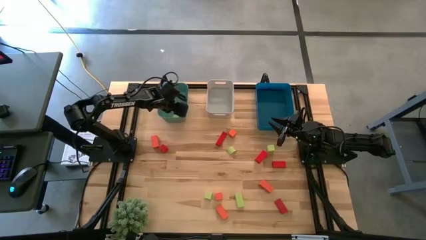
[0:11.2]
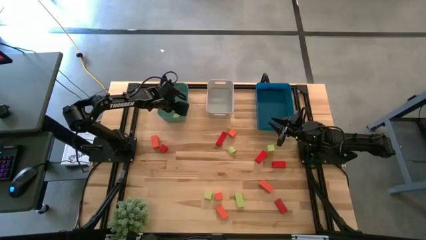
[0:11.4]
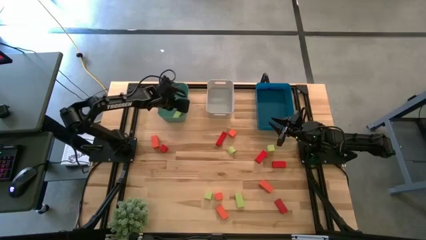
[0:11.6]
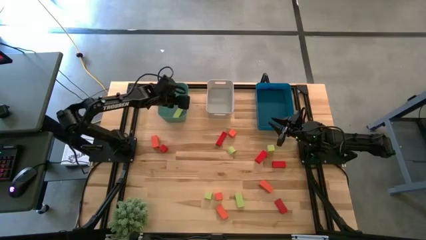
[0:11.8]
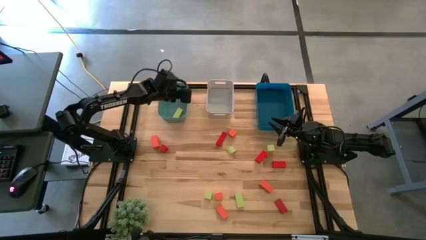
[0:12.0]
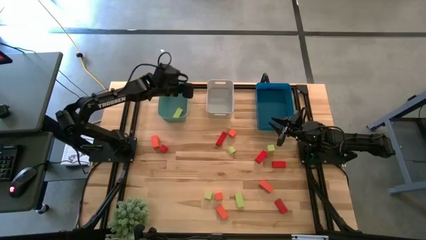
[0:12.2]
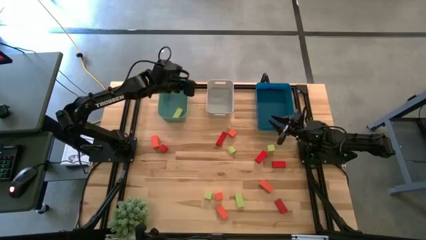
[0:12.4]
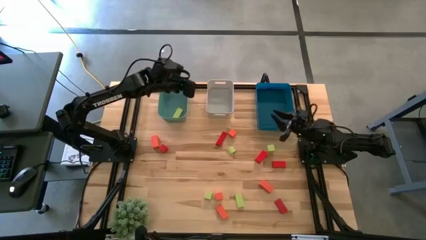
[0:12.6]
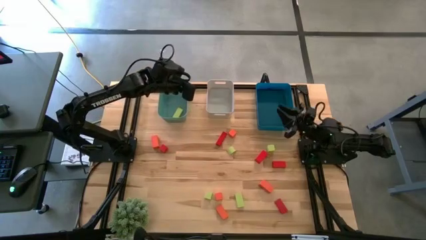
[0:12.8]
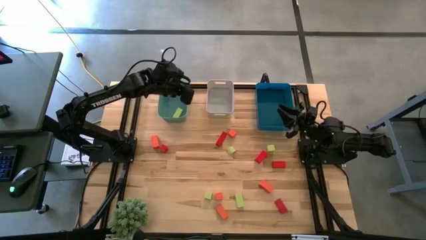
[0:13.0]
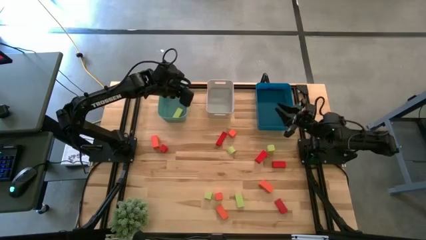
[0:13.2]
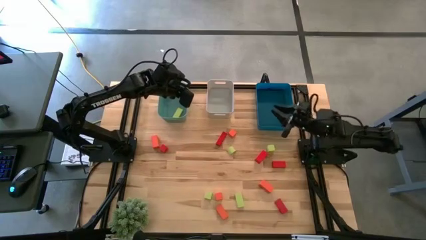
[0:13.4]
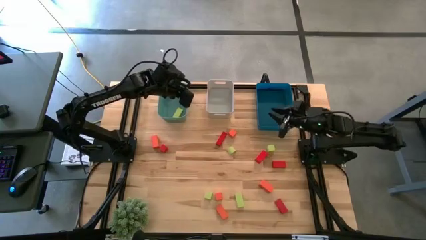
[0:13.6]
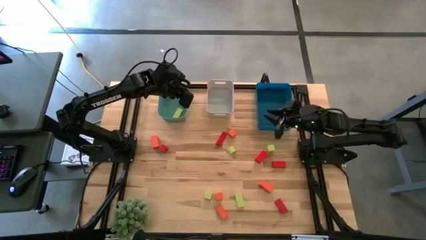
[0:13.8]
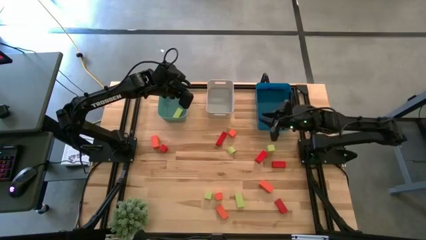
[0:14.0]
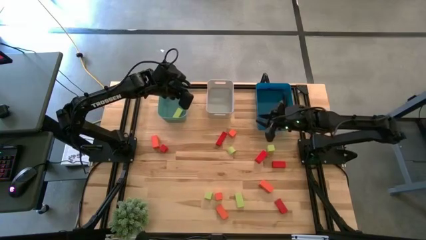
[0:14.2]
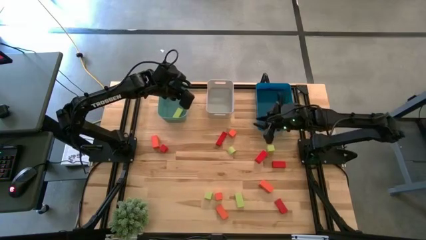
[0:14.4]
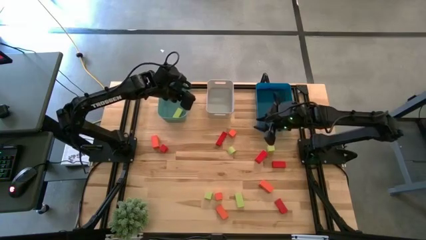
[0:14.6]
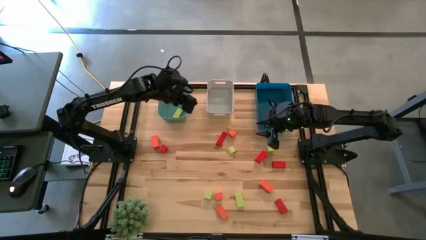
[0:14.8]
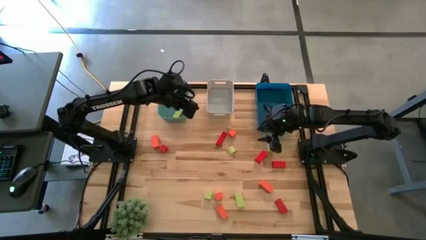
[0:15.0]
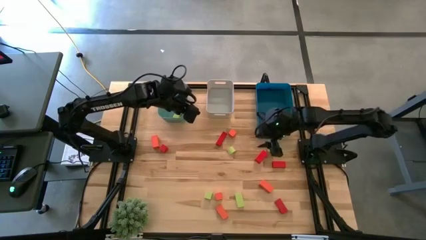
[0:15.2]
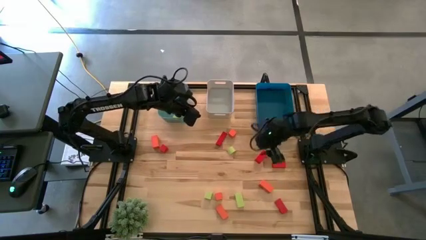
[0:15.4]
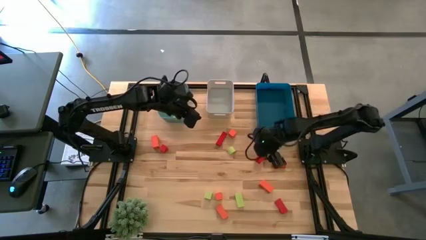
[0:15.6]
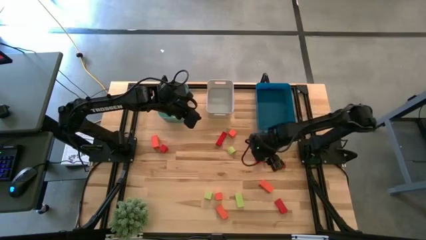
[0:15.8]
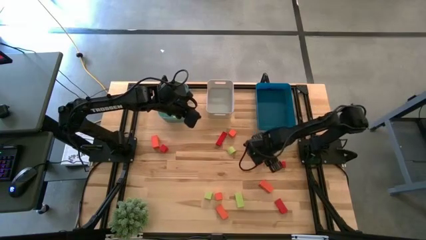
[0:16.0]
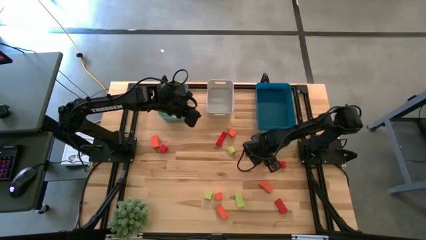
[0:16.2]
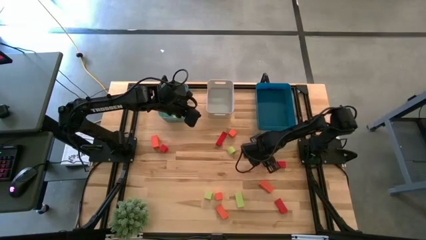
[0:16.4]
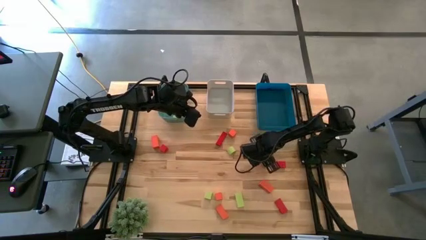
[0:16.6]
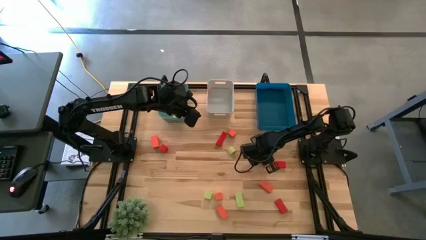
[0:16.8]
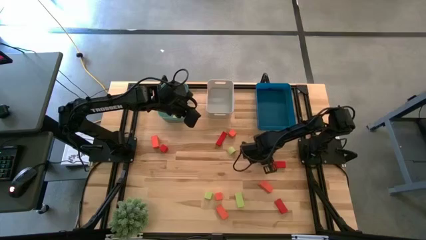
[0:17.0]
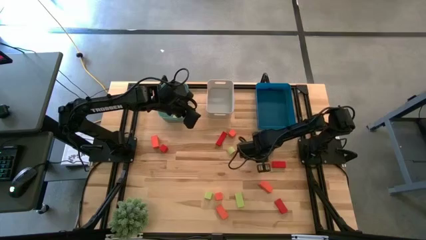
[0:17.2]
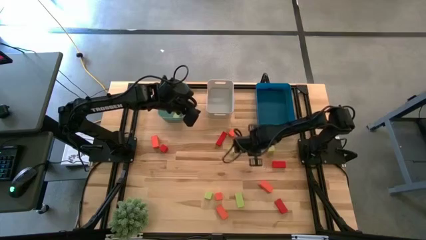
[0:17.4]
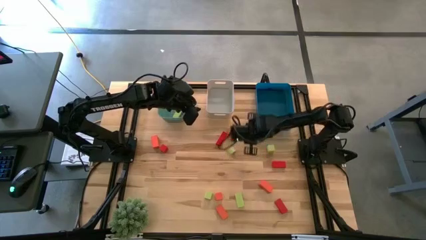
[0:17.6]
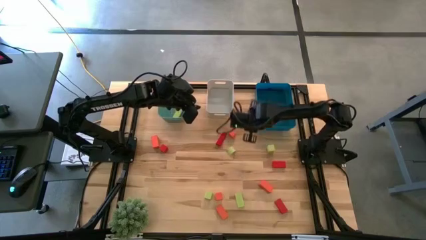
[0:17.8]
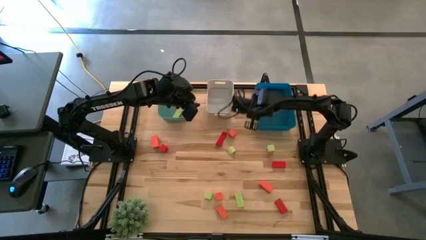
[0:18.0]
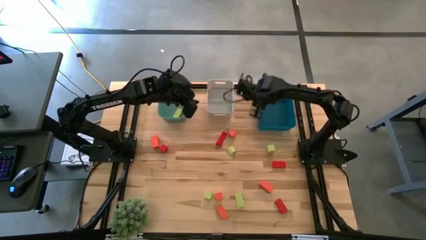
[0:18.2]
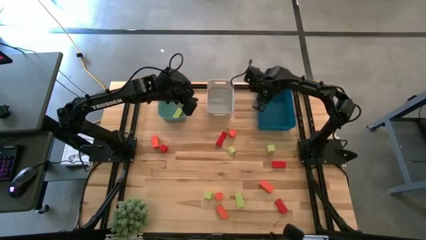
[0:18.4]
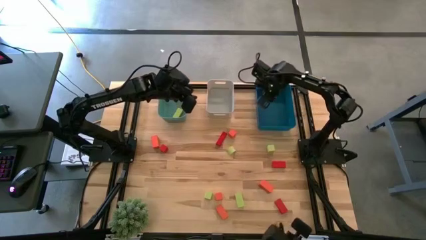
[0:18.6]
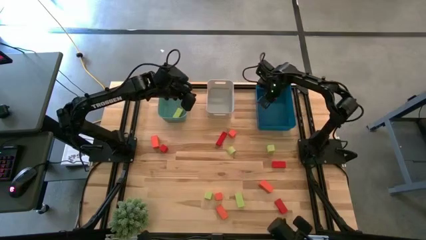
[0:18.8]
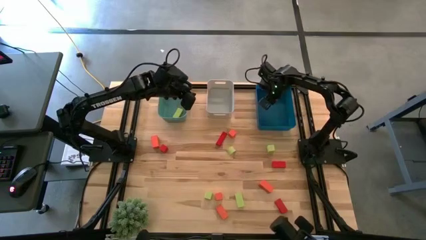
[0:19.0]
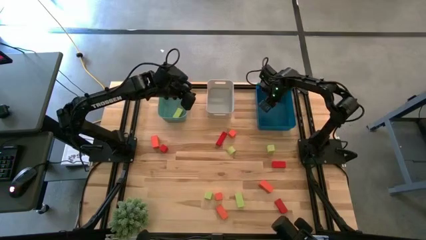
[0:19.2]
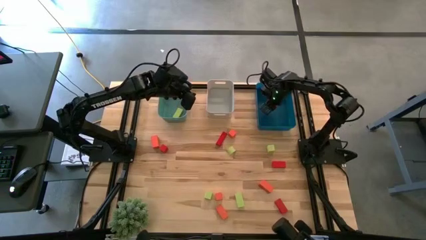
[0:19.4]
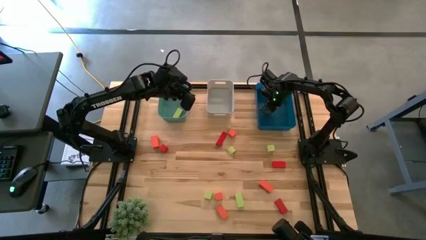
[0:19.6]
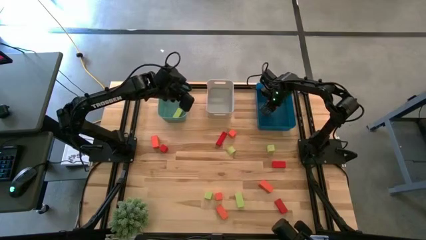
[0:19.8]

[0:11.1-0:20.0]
Task: Sort & place blocks by color
Put the red block into the blue bin

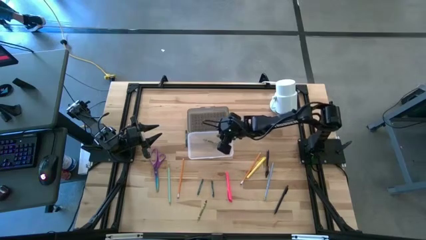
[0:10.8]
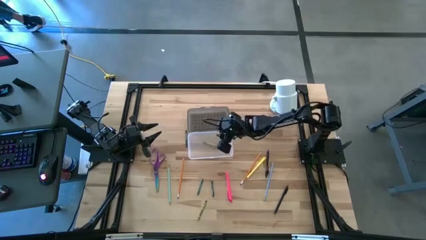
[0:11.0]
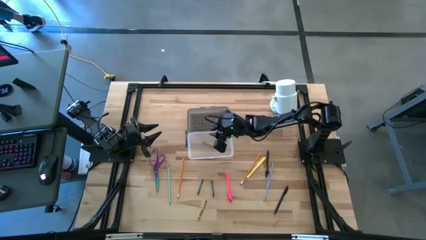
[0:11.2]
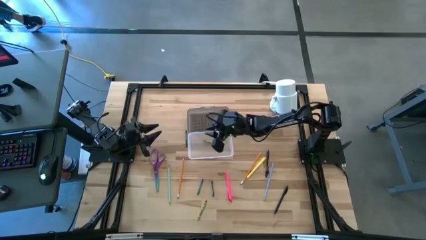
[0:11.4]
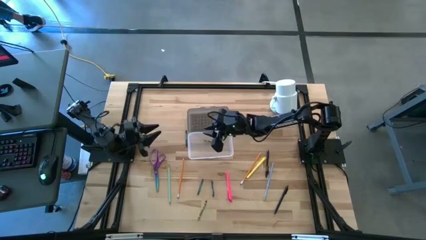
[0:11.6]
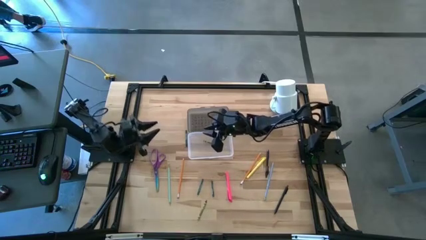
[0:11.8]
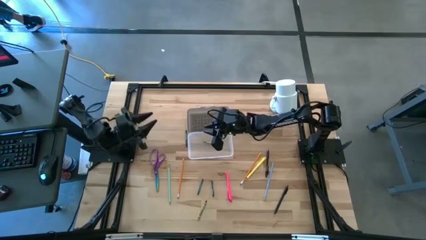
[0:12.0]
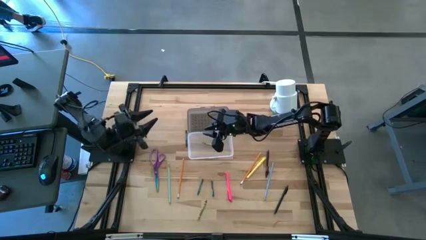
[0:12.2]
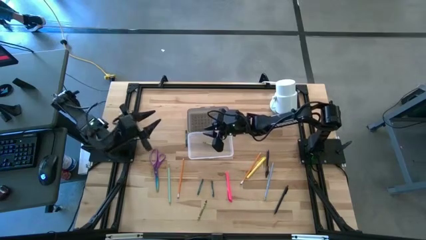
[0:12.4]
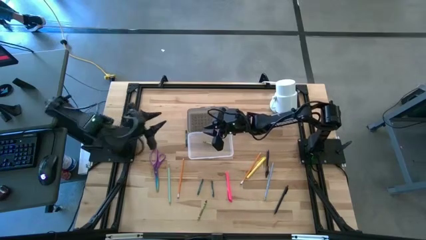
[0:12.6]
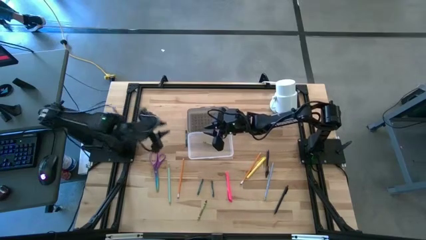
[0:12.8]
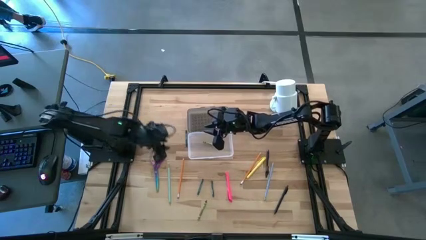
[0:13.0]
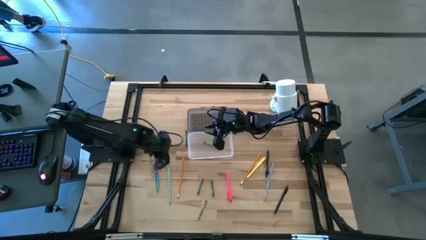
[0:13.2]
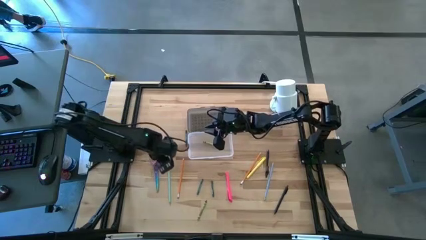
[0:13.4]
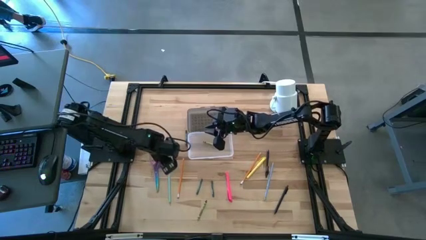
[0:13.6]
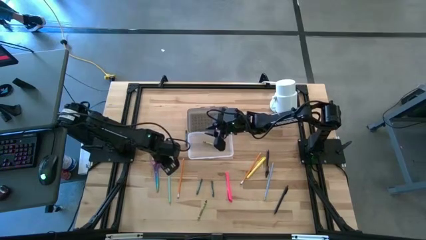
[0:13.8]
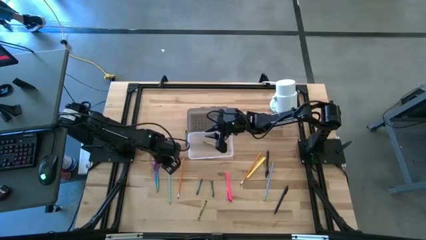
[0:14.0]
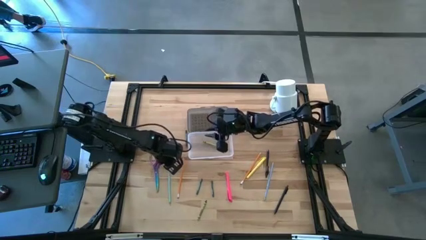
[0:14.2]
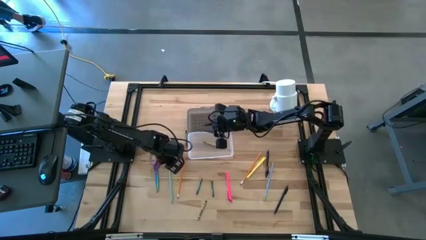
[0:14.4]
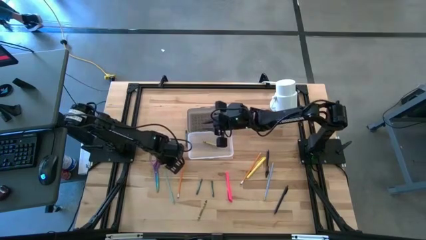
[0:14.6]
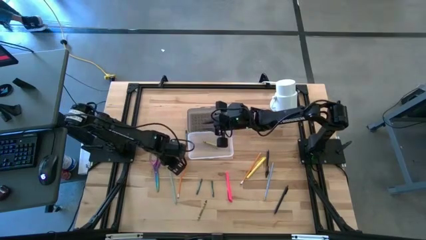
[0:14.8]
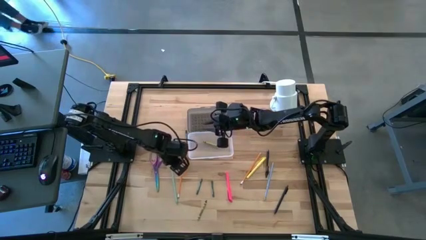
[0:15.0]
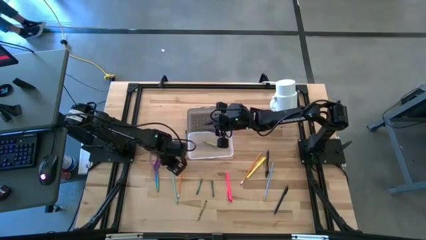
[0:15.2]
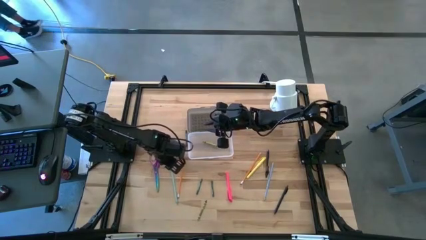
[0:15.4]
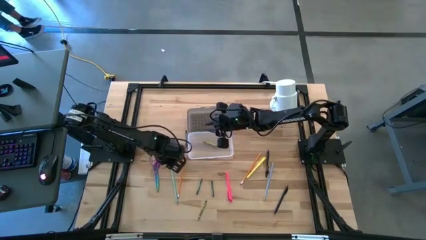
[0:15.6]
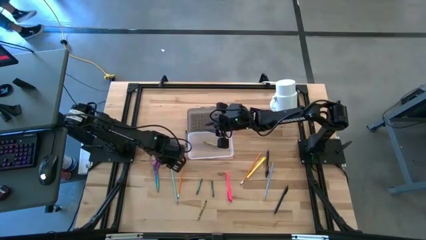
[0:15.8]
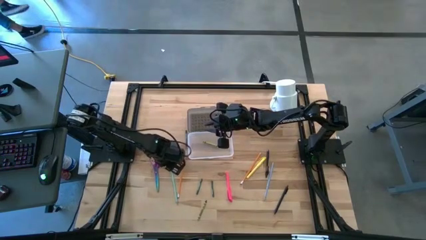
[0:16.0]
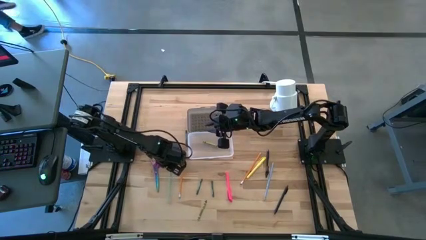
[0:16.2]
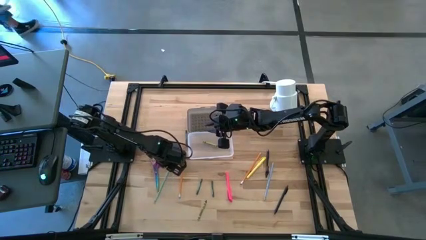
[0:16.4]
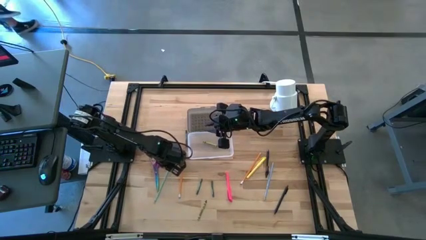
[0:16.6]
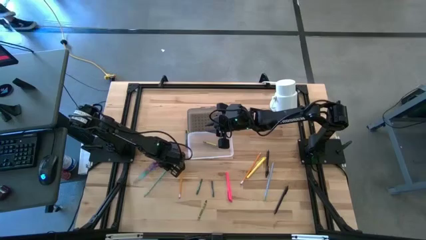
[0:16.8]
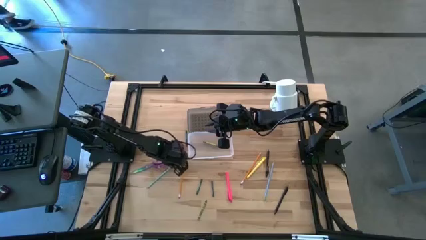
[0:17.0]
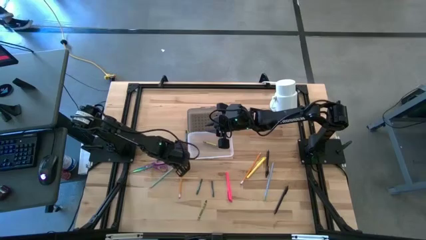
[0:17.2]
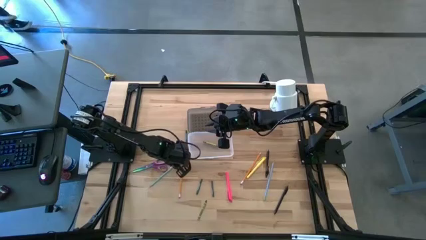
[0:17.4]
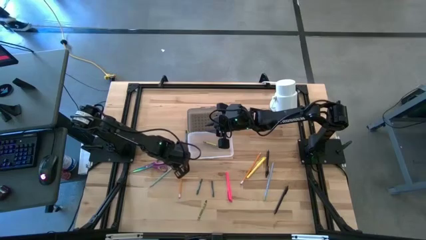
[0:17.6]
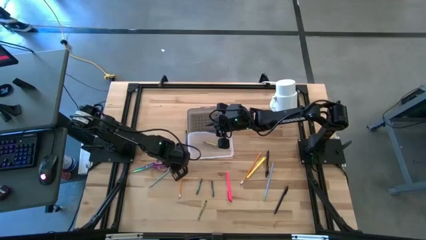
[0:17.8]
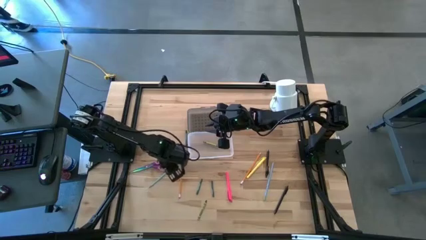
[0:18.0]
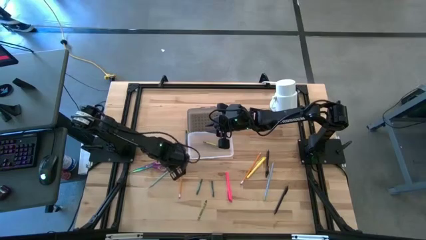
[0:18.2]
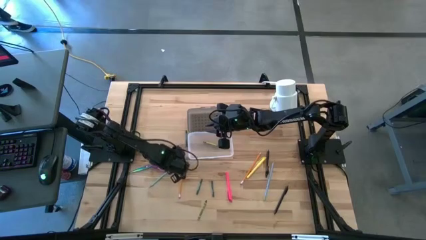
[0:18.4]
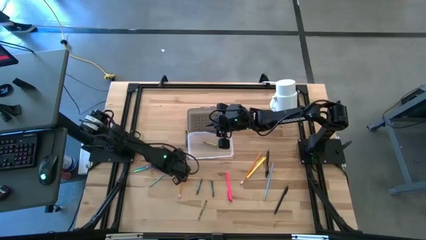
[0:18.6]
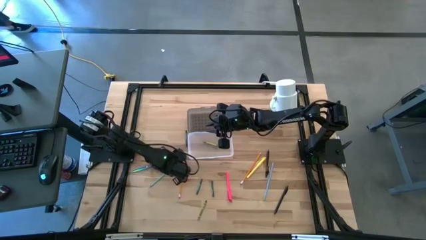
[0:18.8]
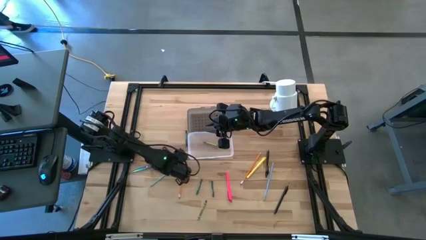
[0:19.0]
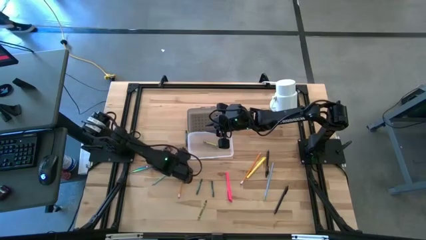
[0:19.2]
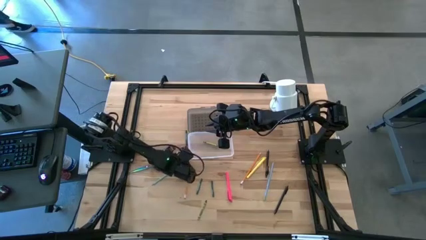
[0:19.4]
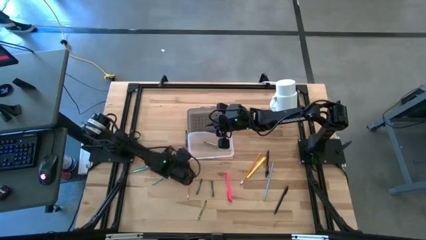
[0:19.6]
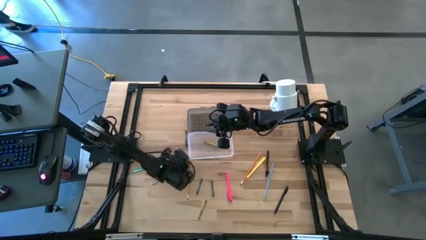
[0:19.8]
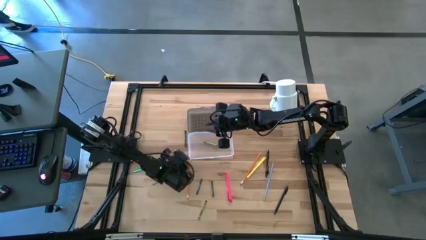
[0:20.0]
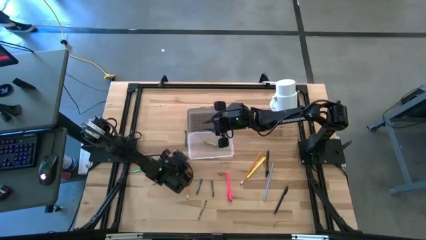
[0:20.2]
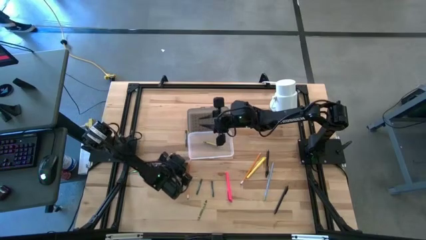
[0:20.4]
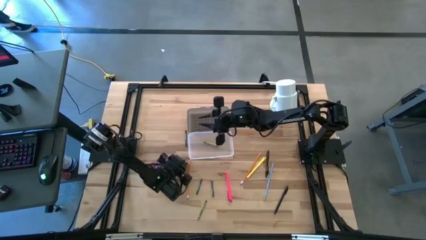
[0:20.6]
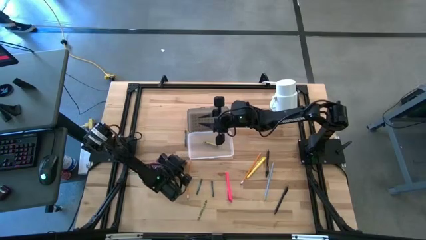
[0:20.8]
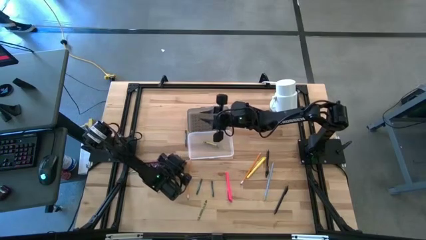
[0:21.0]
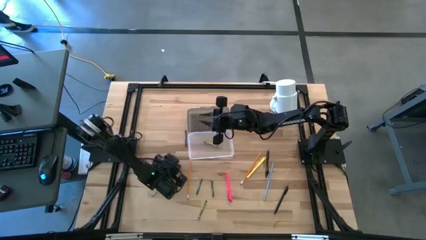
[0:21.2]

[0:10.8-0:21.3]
Task: Pick & place school supplies into a supply box
Put the light blue pencil into the gray supply box
